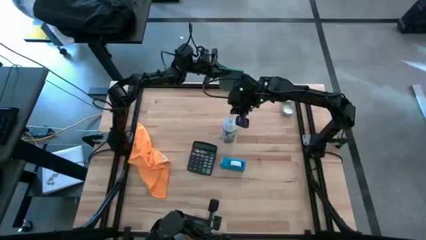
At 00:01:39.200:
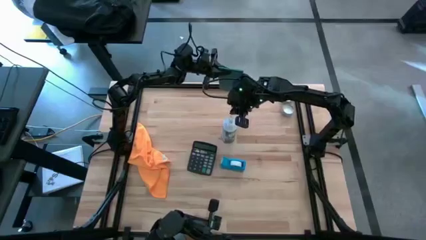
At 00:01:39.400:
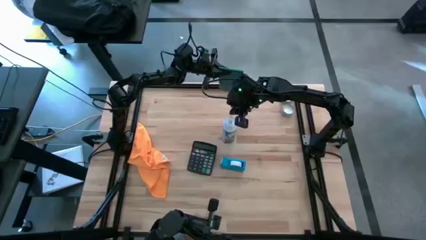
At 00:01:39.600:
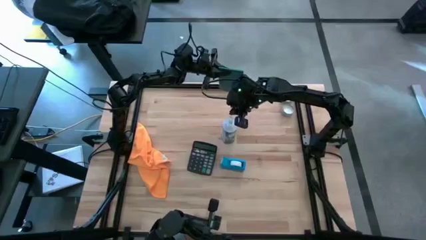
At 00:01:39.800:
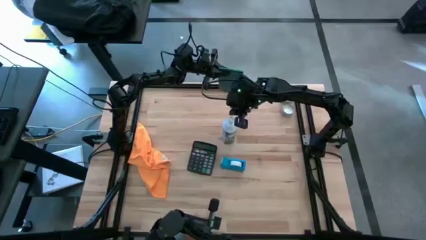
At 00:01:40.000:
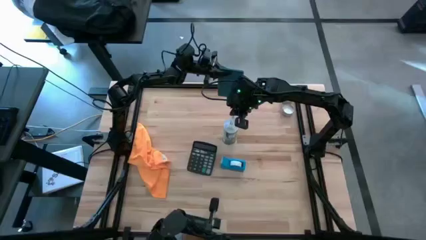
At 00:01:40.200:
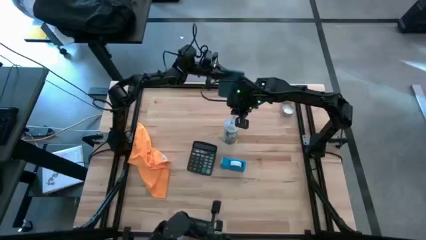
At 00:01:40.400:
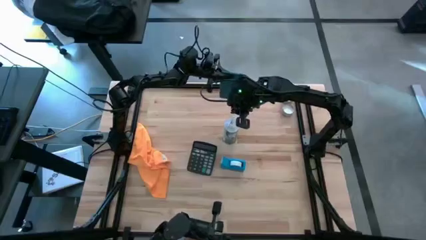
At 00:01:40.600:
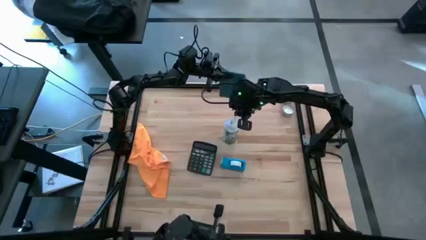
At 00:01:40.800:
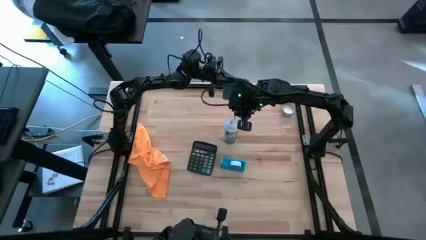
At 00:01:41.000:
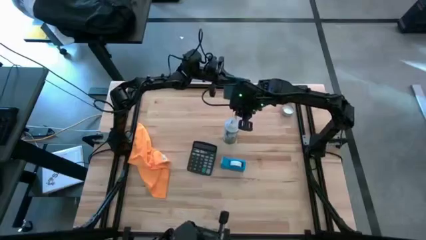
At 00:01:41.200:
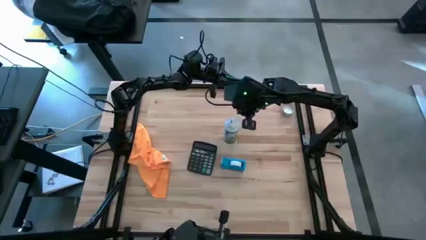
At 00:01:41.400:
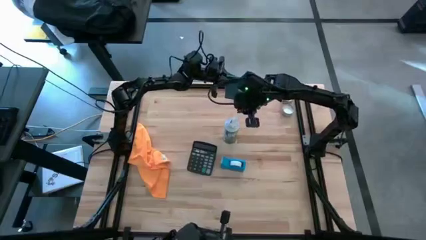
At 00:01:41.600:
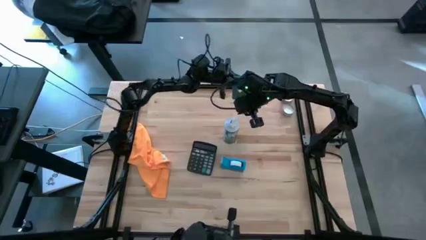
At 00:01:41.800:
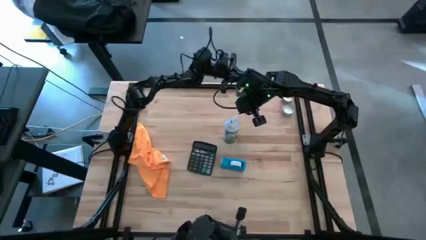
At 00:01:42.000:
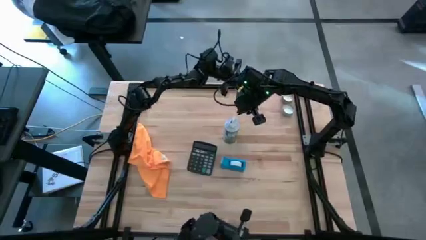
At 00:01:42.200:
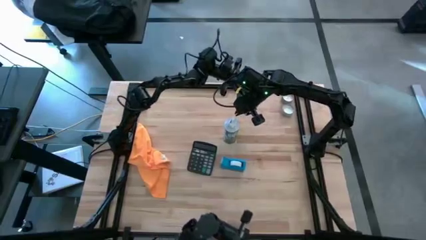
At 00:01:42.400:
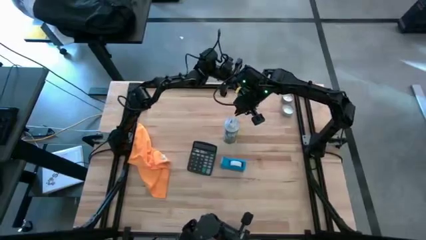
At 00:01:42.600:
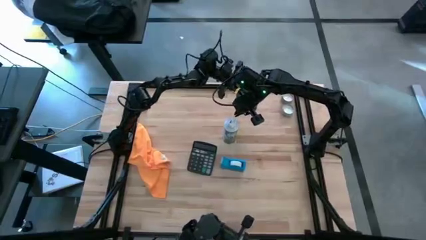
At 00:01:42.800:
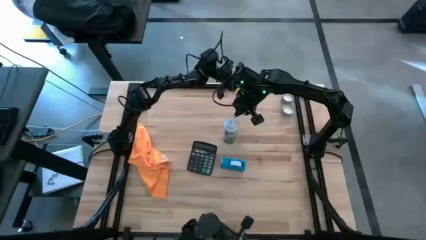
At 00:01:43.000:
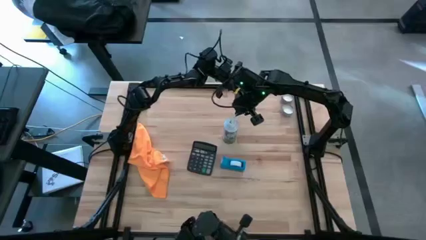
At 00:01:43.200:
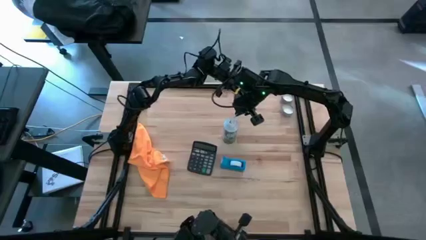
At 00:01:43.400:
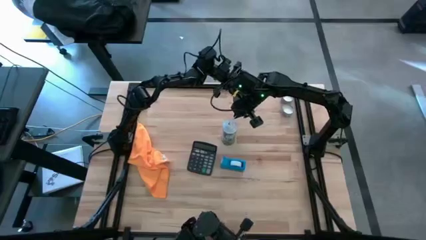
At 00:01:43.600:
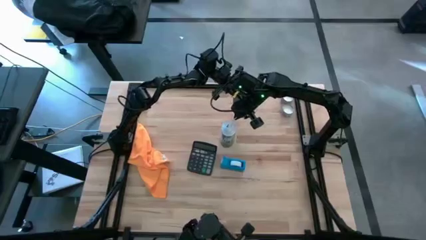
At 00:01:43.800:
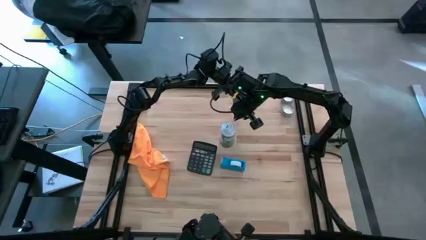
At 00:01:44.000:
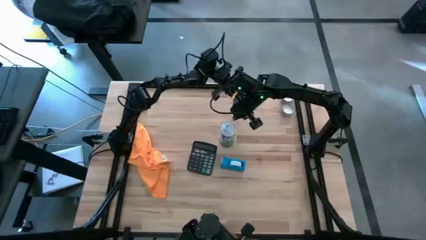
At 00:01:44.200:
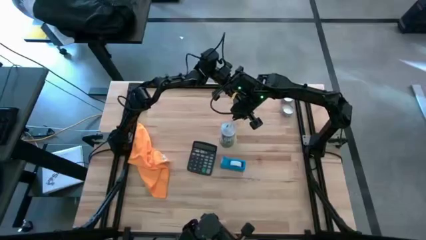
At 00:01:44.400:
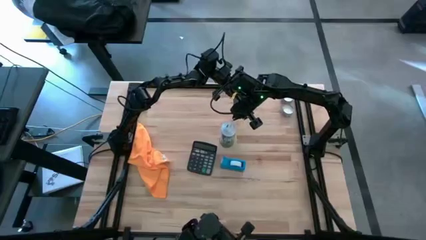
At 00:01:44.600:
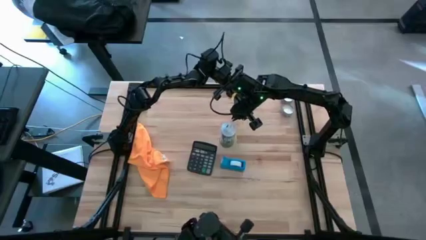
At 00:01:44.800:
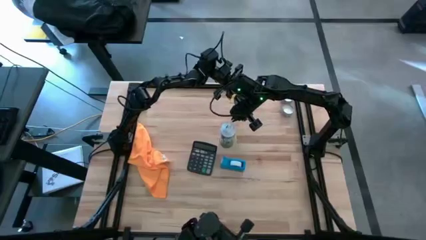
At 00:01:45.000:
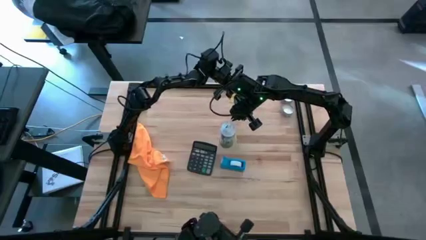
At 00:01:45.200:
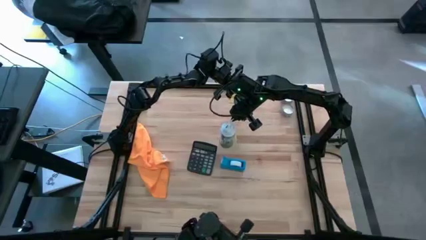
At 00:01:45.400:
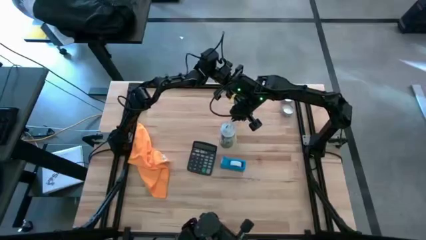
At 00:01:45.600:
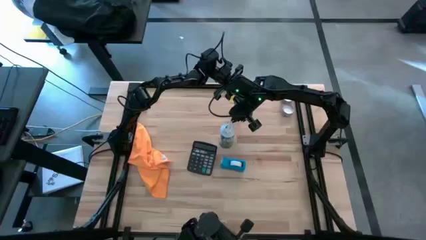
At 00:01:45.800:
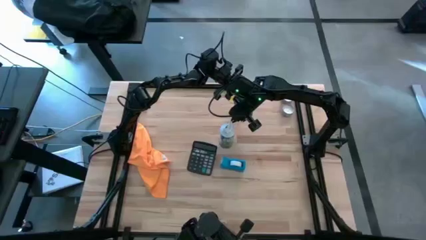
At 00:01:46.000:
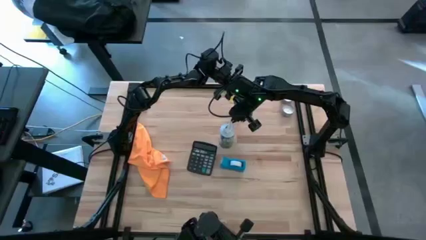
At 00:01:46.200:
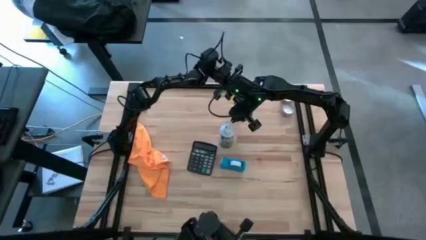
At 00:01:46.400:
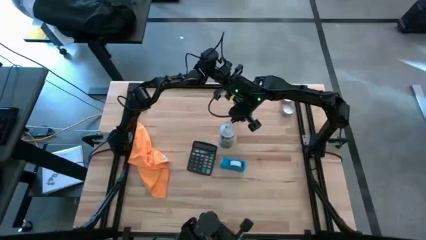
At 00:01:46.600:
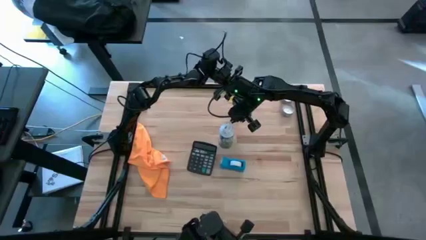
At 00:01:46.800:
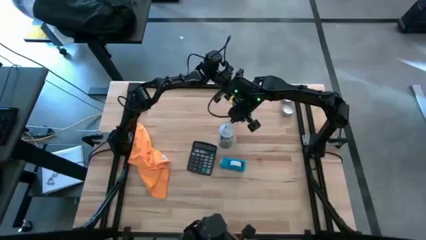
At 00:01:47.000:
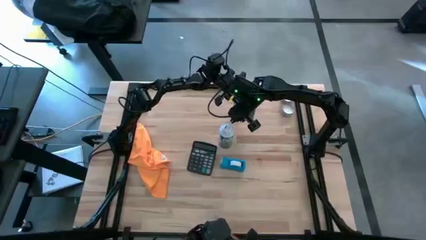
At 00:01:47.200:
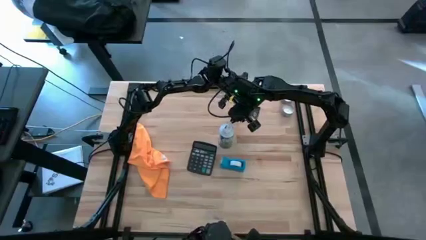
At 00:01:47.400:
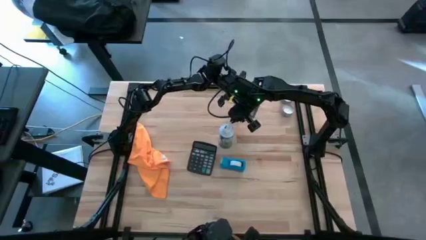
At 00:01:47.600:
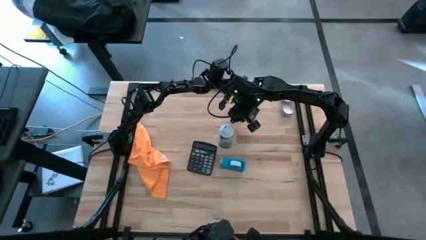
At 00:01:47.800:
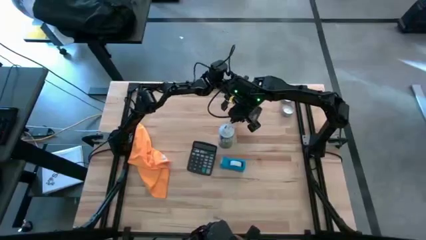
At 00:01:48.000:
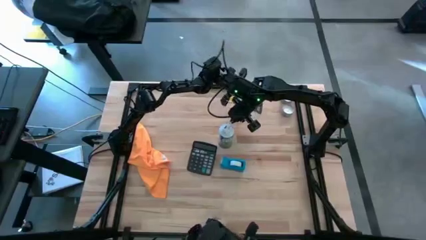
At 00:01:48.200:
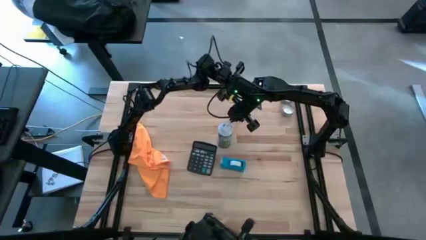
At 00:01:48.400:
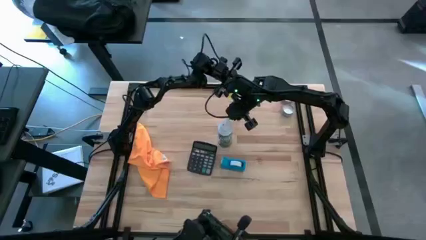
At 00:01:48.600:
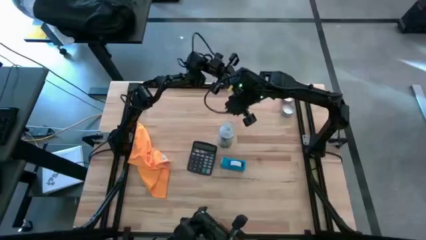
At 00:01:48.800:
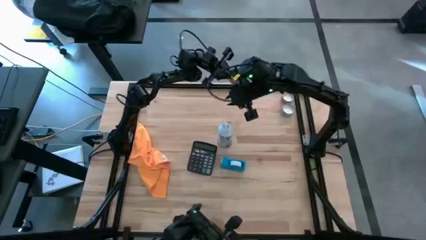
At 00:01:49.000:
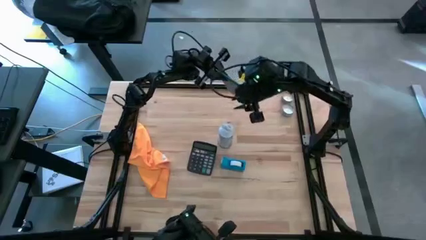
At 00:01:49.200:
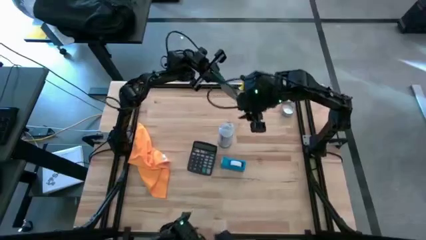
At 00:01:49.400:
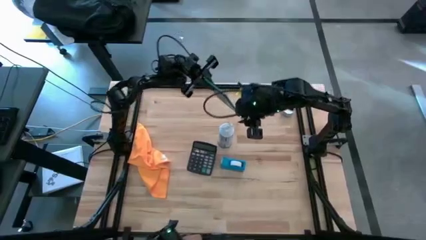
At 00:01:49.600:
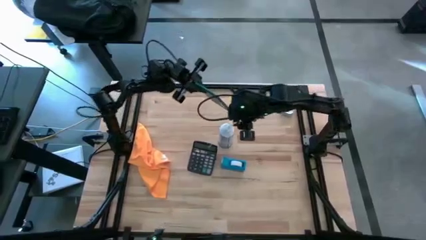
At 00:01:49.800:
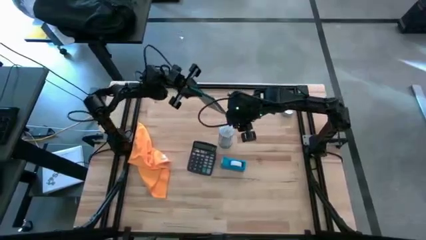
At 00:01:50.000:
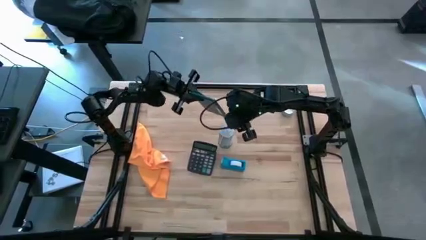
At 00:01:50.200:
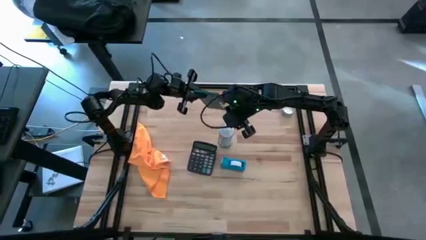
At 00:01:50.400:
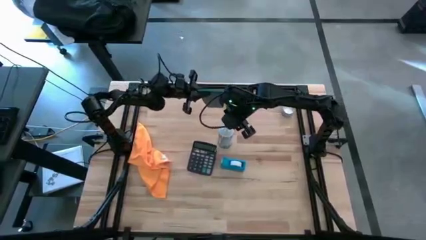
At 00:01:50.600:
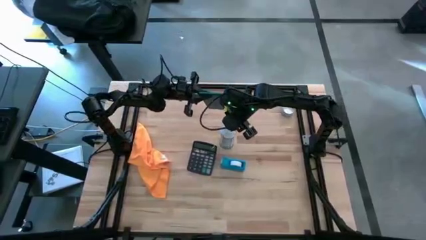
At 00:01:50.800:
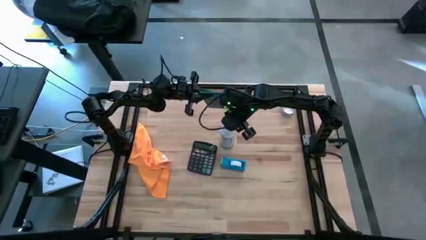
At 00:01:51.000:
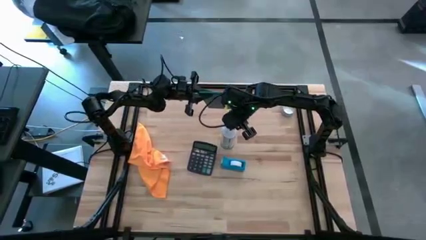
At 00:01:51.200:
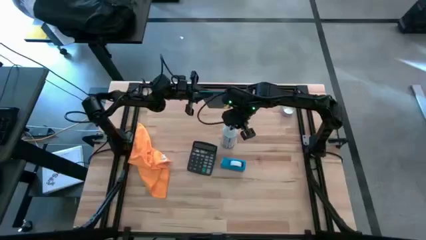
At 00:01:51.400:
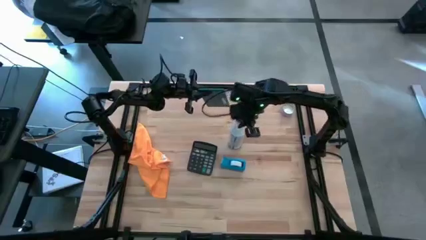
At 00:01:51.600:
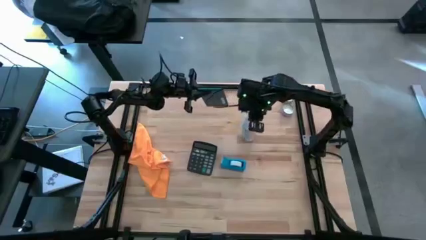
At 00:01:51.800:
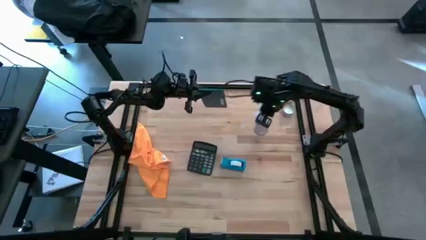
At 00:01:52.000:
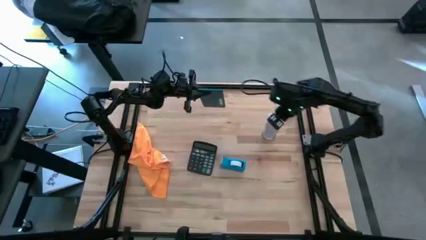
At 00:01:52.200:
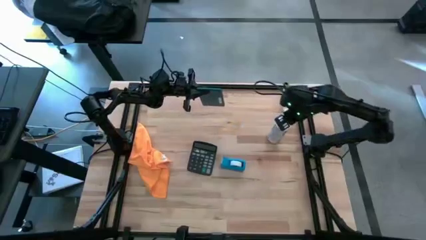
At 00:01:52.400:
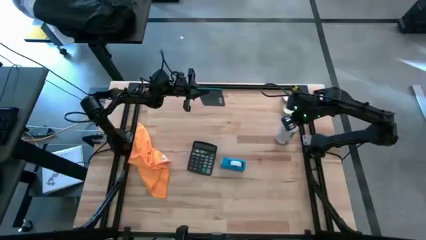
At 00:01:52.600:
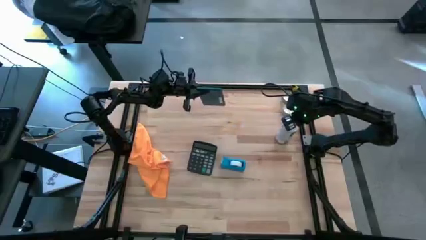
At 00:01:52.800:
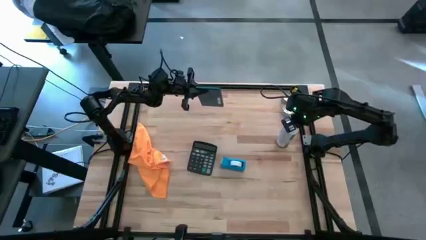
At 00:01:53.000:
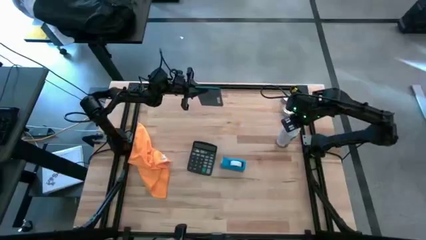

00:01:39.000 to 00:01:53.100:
Task: Apply microfiber cloth
Spray the back of the cellphone with spray bottle
